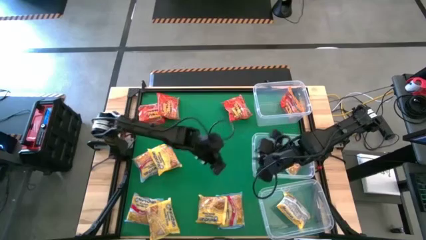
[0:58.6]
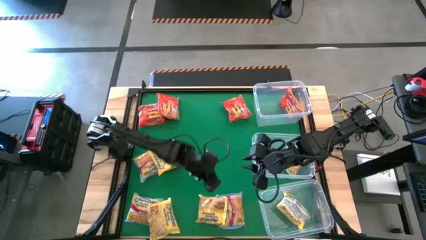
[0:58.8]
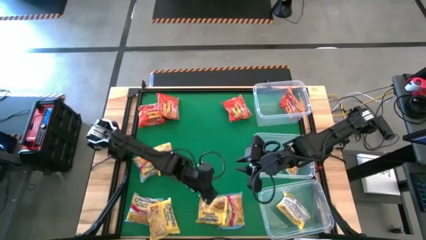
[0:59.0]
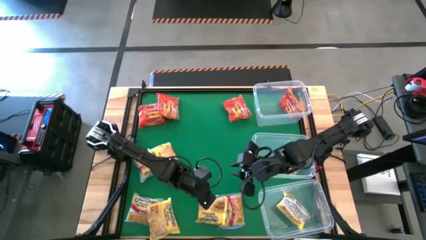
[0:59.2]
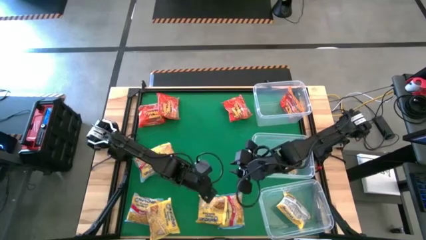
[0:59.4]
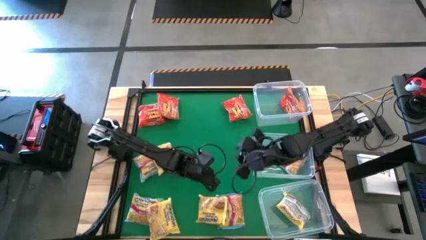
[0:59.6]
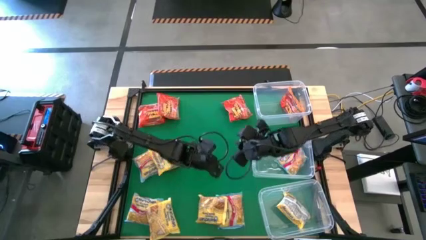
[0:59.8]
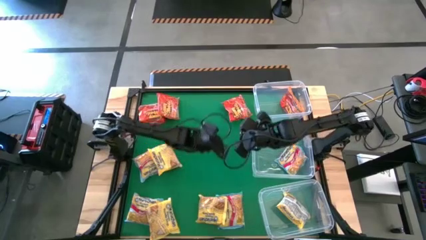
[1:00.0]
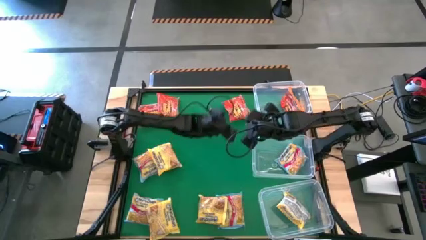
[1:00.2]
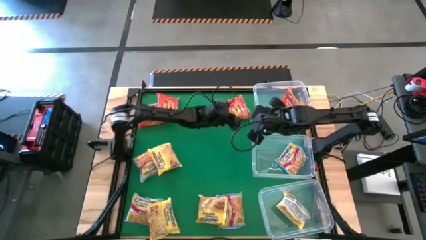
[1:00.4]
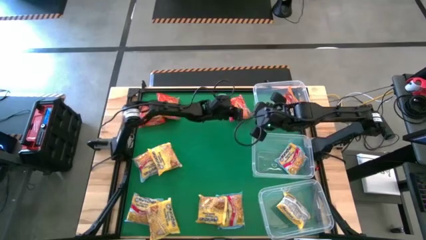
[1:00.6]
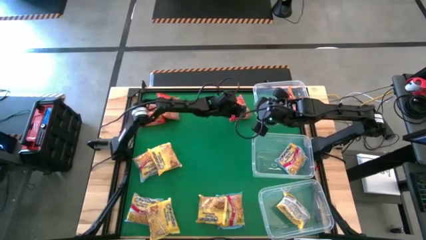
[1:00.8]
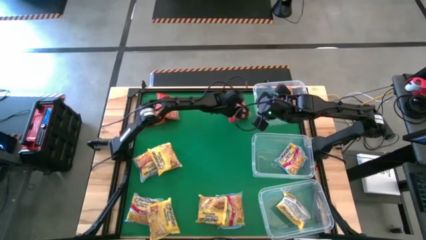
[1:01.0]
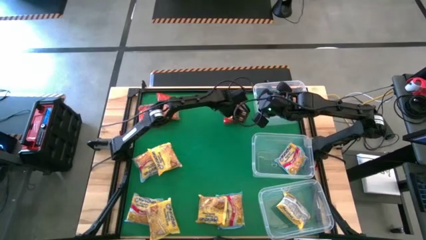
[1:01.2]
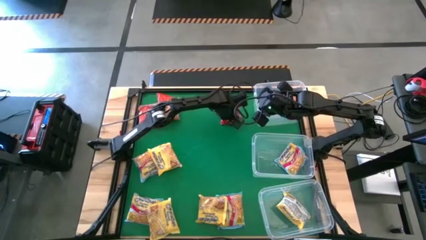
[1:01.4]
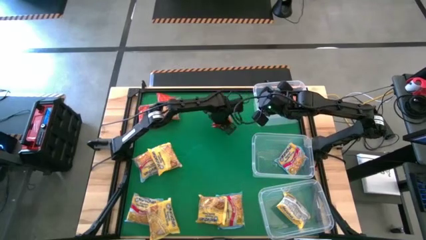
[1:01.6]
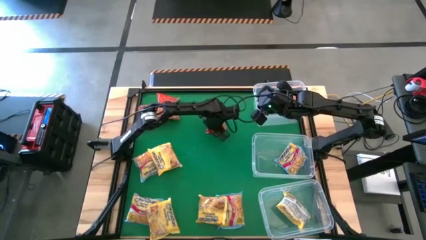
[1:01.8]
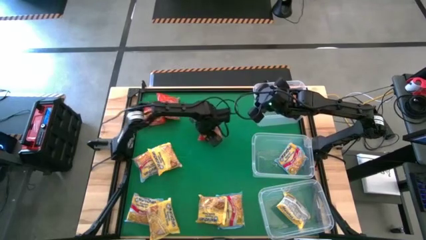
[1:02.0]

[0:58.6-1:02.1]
Task: Sort Maruchan noodles
Move the top red noodle pack to the center of the table

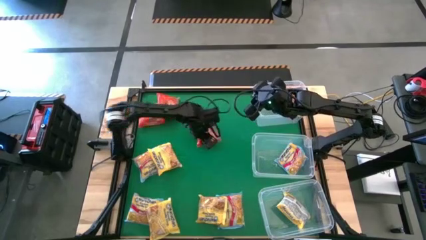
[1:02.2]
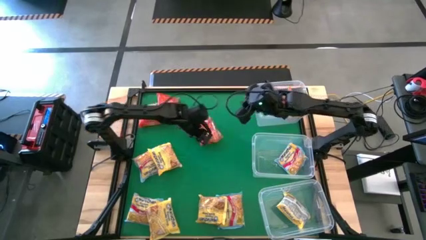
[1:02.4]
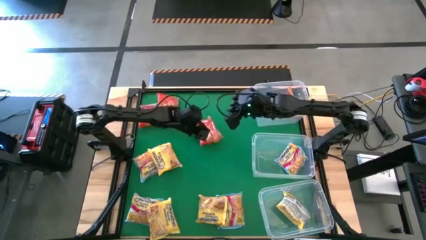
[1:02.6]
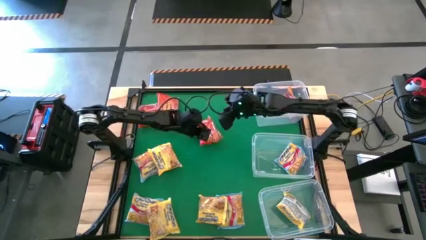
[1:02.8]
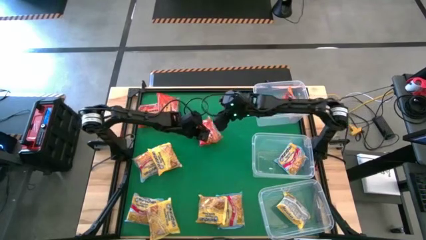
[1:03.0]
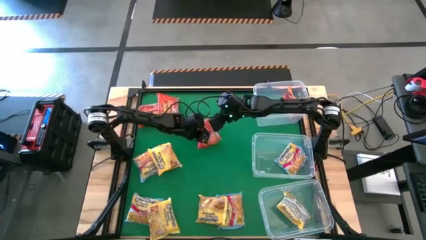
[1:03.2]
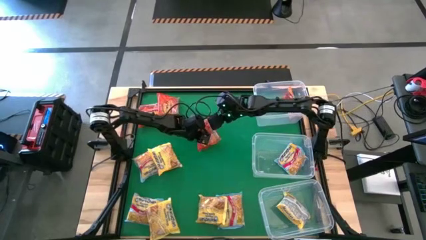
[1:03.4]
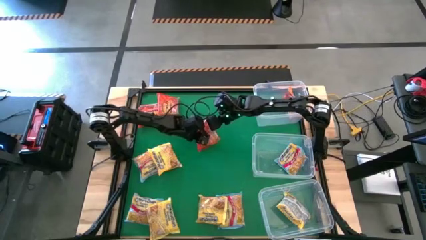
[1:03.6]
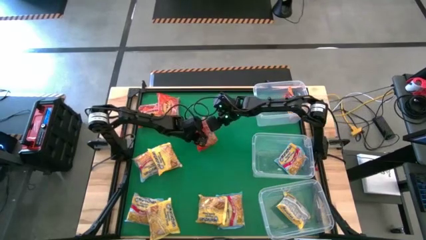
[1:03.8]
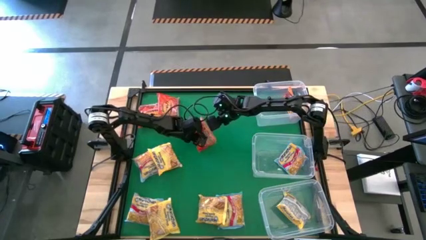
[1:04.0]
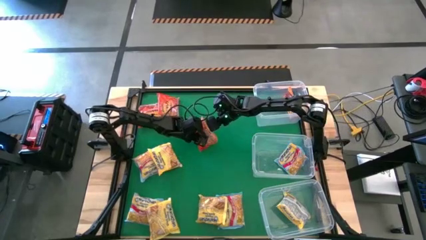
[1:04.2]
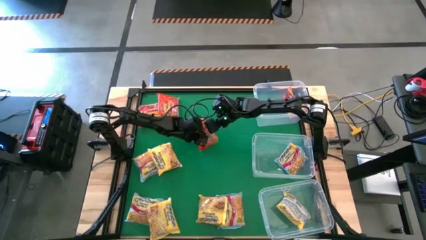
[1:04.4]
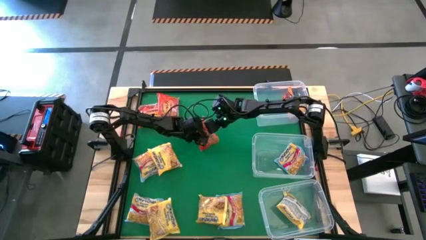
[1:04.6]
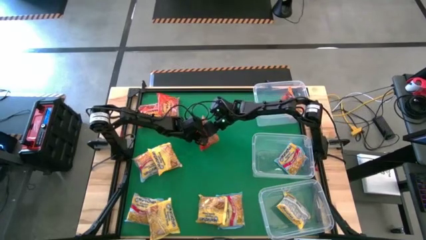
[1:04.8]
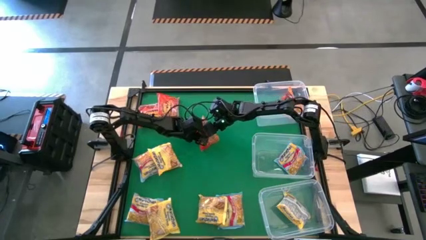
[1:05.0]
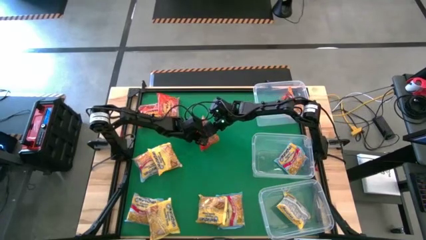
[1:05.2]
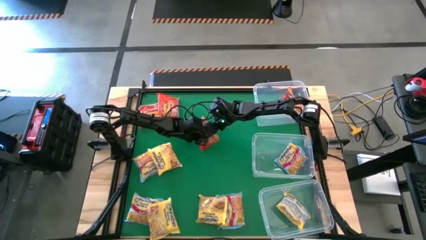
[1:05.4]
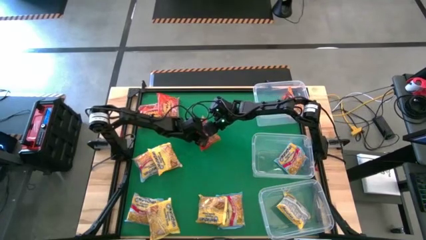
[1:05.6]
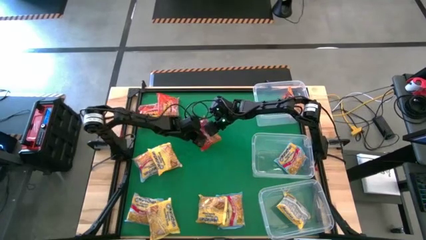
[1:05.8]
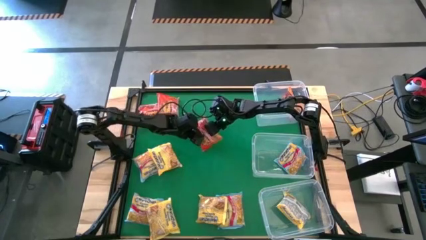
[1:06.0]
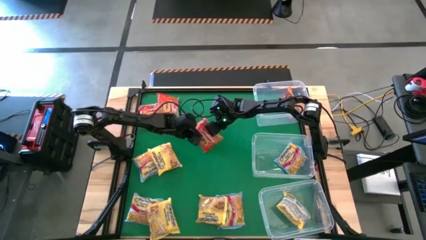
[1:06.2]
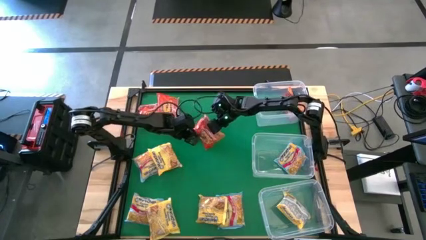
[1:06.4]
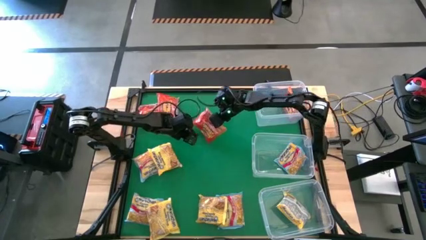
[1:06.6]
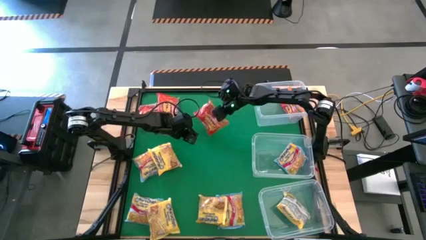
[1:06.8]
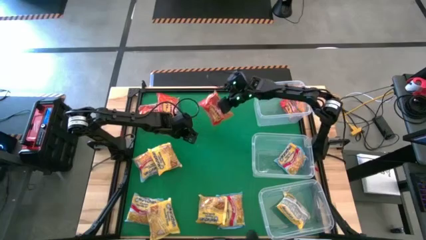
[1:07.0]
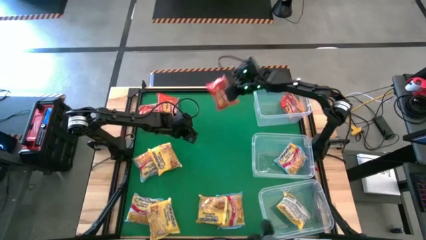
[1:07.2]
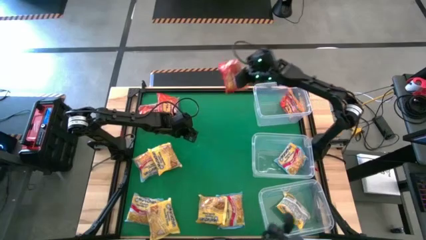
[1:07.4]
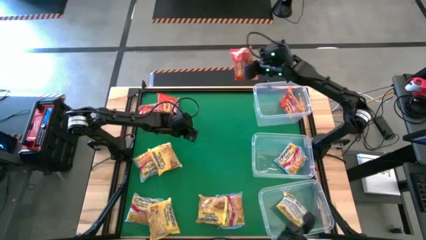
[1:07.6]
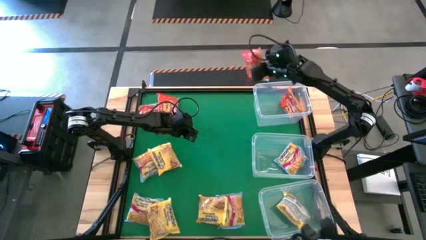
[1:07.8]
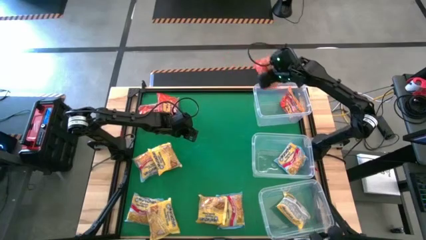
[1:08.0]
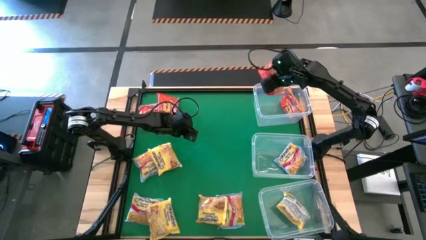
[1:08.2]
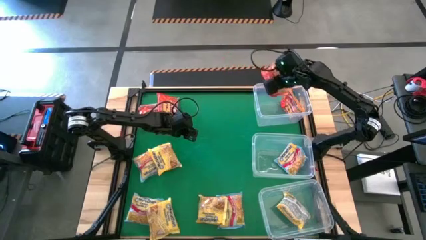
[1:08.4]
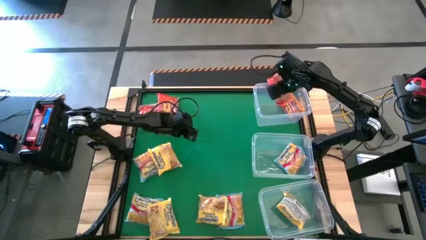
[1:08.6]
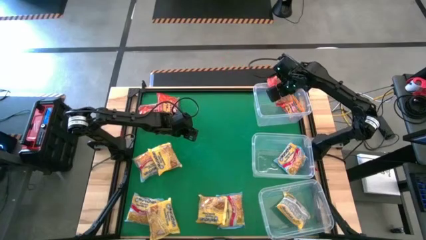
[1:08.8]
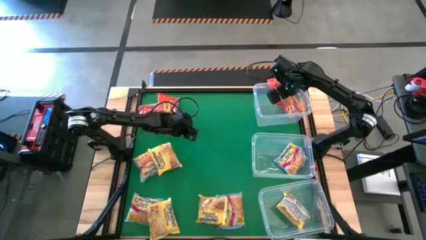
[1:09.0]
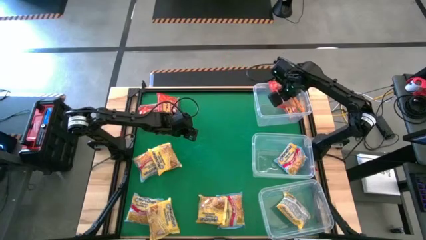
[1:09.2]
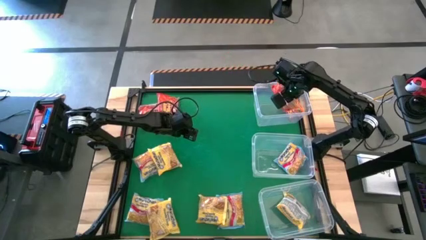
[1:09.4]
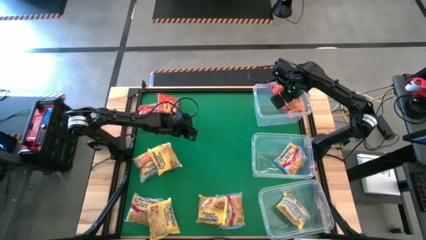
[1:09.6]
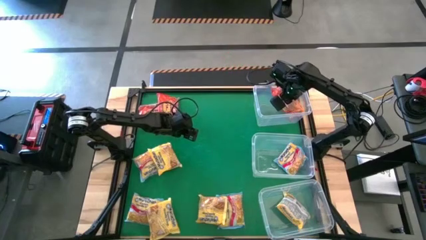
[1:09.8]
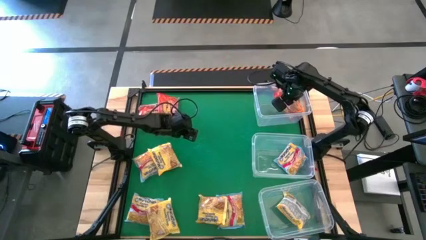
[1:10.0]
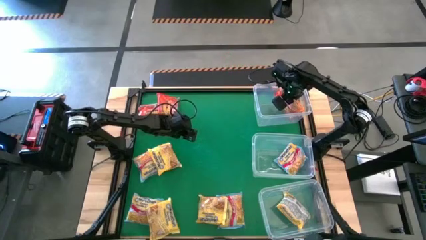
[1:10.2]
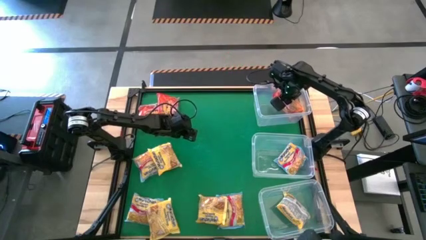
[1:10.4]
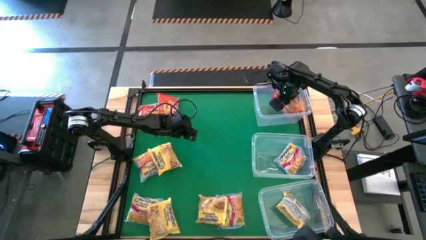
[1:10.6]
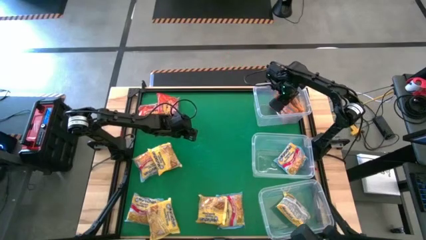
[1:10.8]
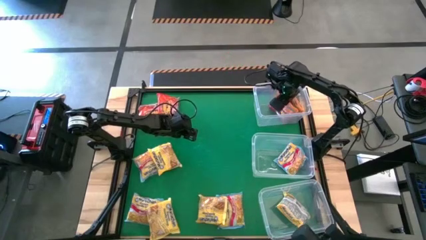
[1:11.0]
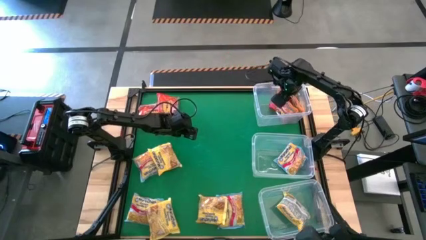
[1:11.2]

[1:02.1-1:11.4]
Put the center red noodle pack into the top transparent bin

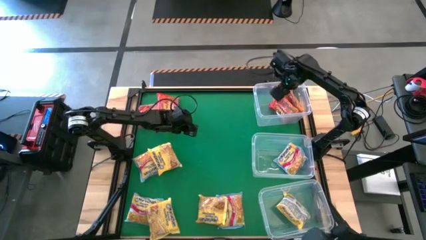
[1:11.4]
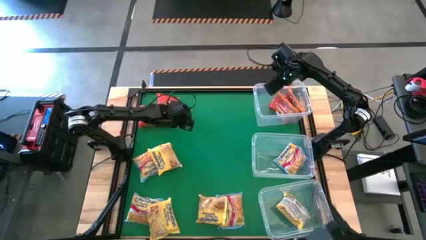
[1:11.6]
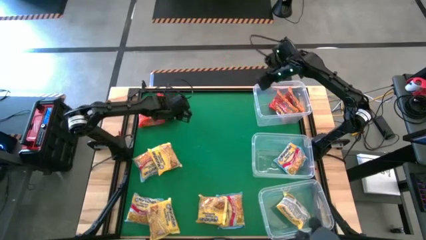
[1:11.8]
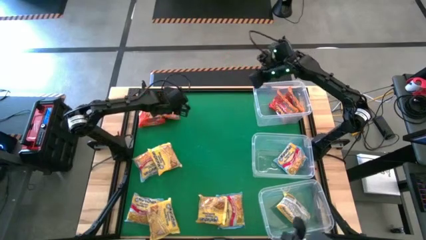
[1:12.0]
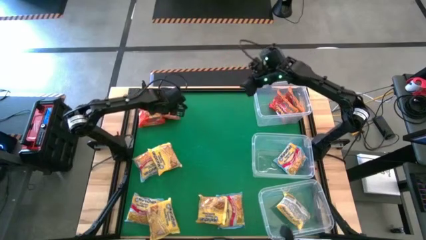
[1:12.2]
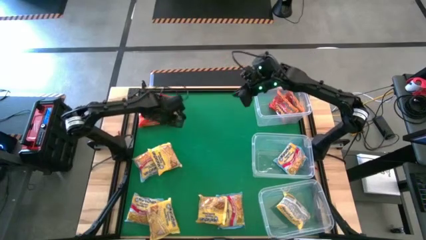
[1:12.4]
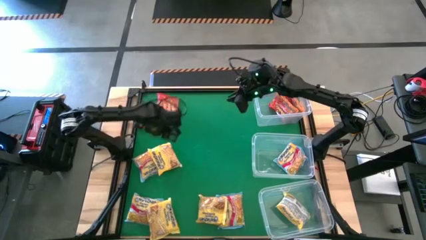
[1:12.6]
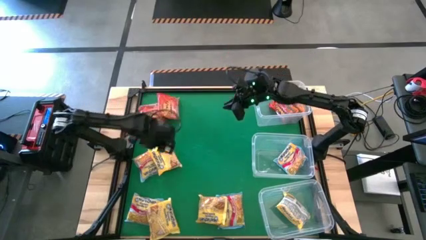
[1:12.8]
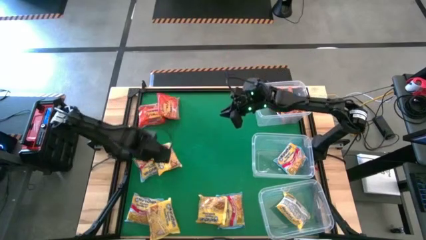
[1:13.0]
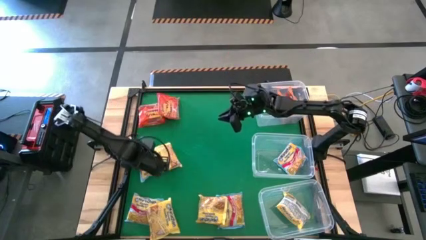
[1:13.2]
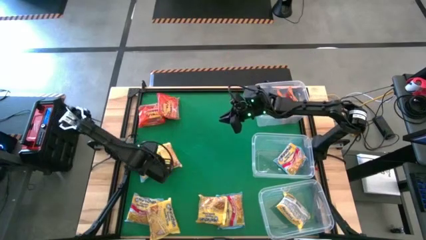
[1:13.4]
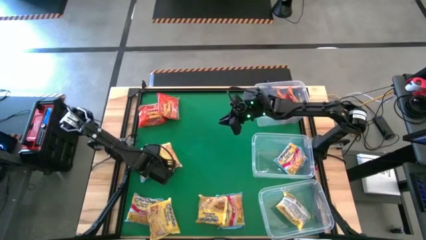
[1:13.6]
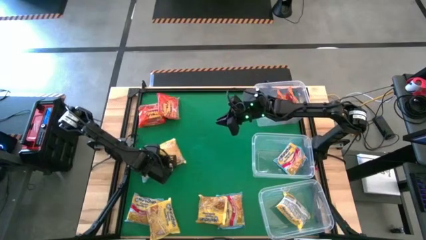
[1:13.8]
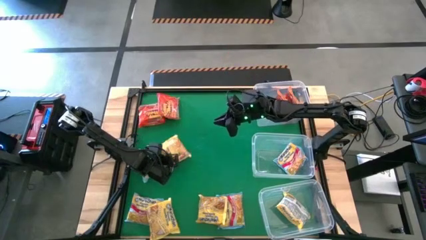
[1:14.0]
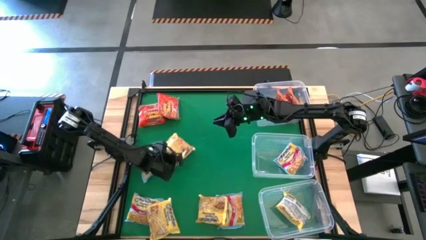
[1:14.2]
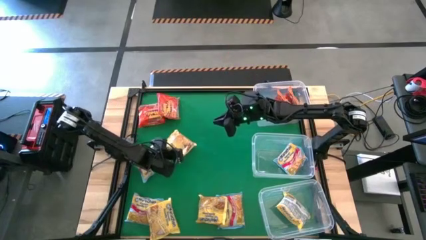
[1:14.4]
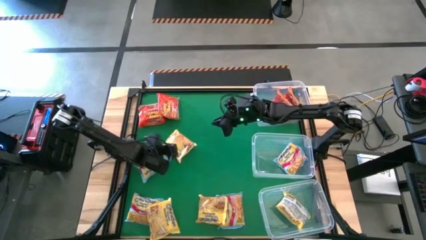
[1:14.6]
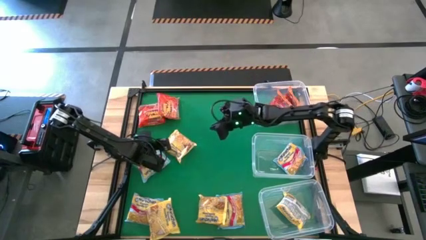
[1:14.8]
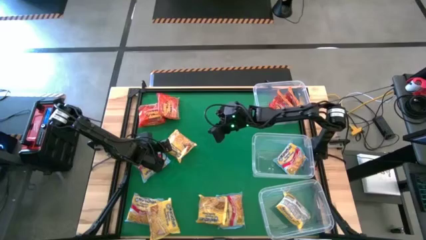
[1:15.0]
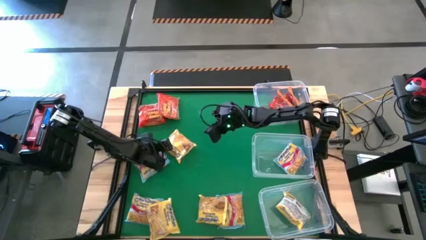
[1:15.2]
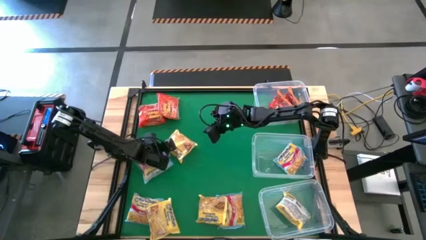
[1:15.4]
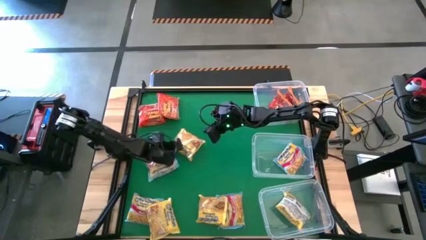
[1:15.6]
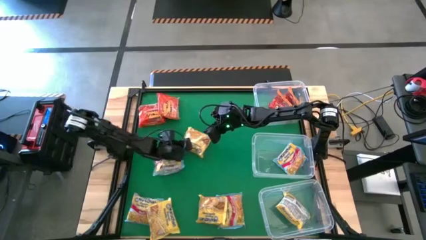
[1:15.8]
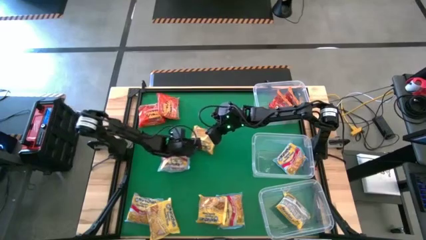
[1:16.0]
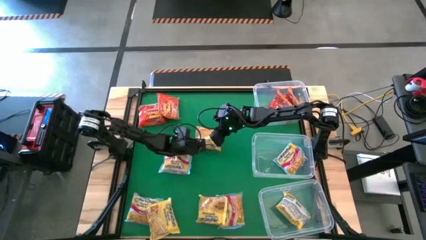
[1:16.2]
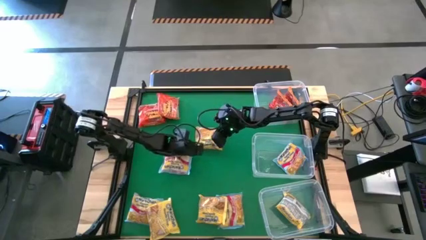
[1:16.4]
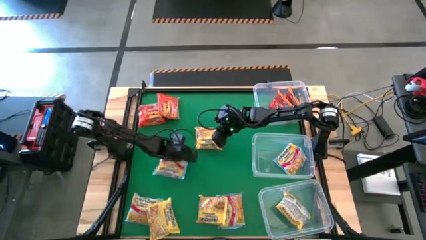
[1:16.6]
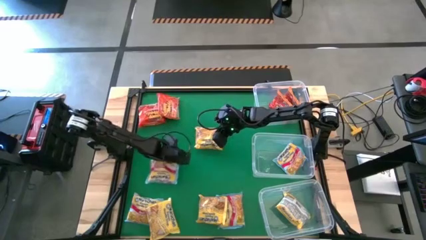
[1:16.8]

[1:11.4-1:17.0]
Move the top yellow noodle to the center of the table
